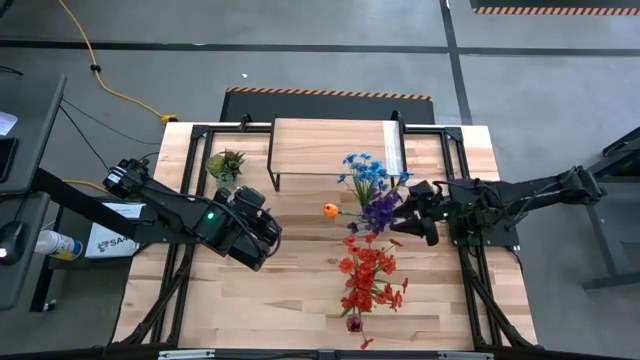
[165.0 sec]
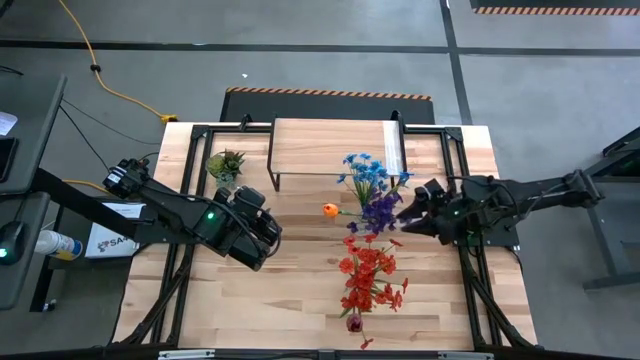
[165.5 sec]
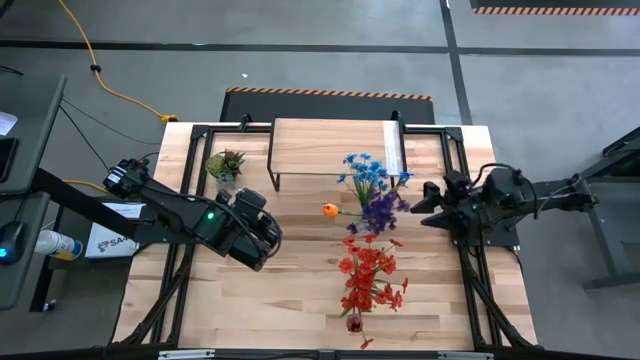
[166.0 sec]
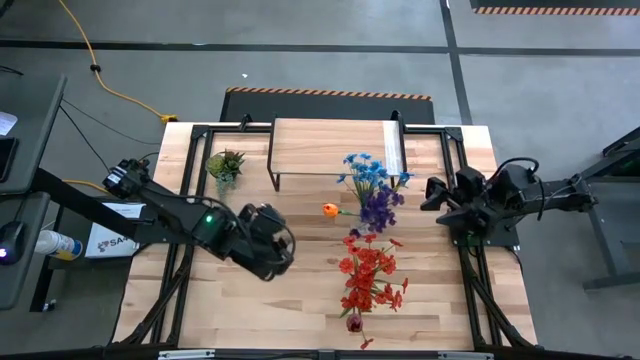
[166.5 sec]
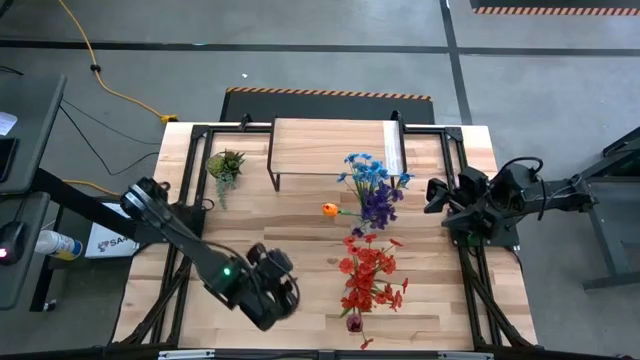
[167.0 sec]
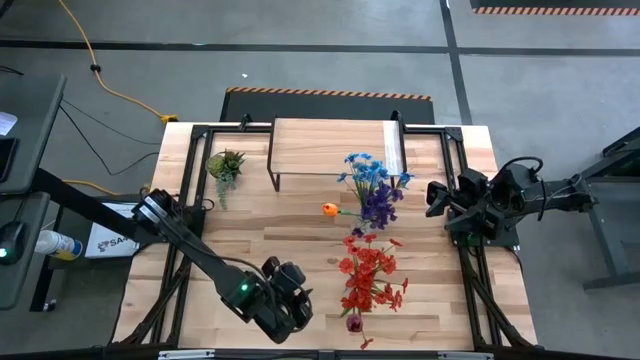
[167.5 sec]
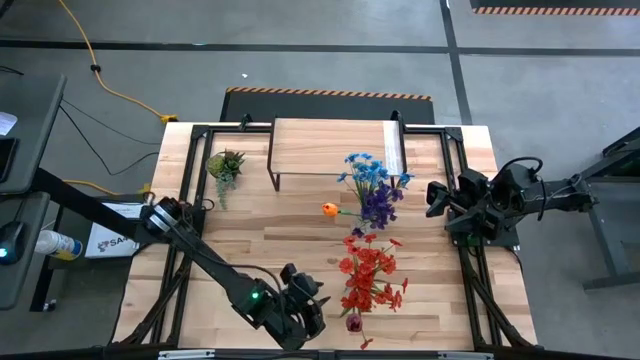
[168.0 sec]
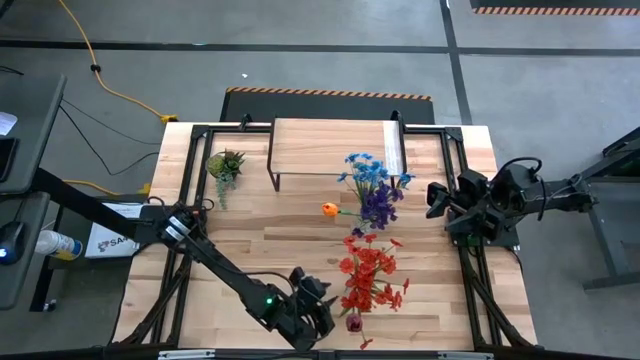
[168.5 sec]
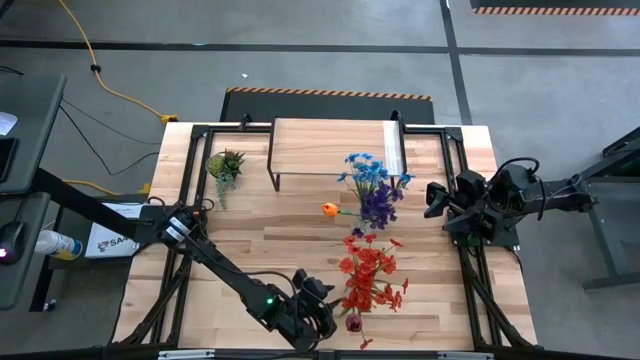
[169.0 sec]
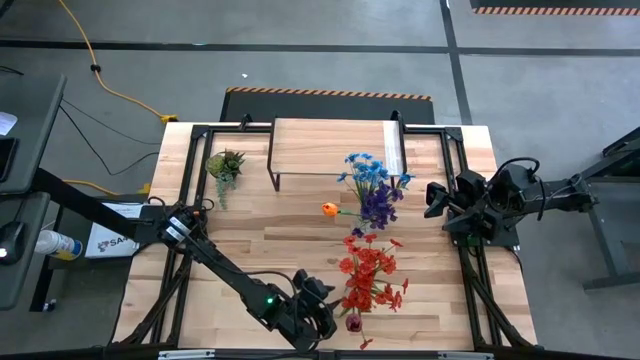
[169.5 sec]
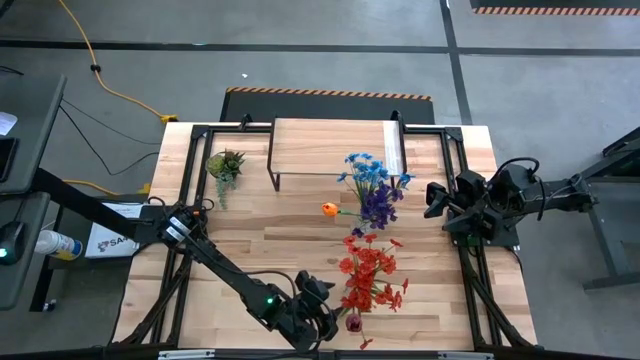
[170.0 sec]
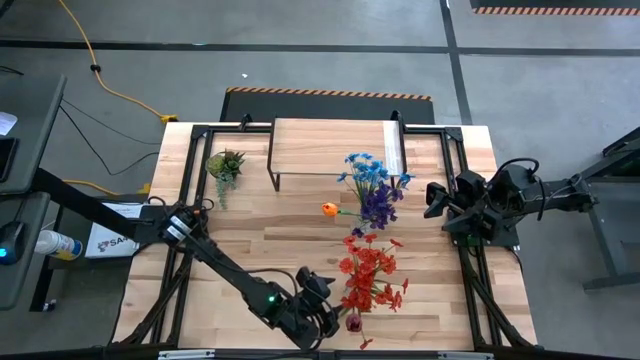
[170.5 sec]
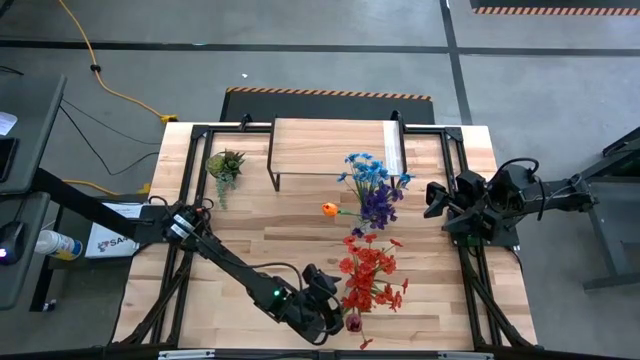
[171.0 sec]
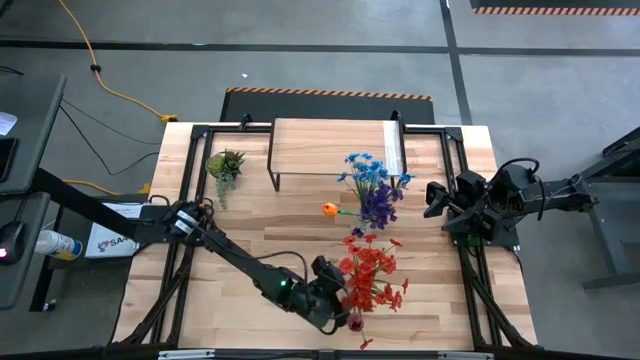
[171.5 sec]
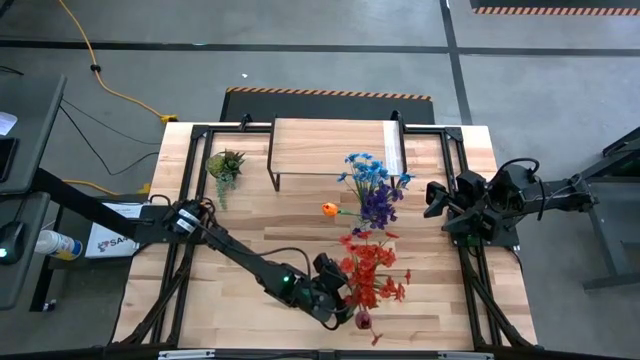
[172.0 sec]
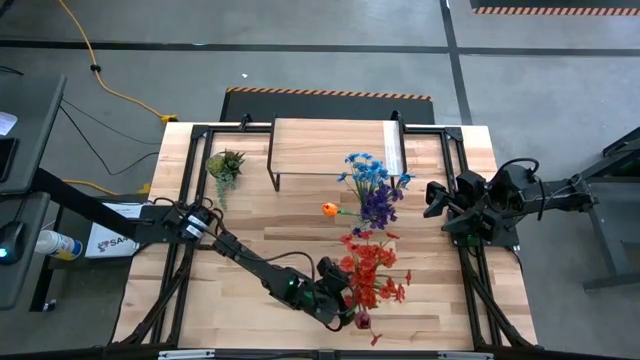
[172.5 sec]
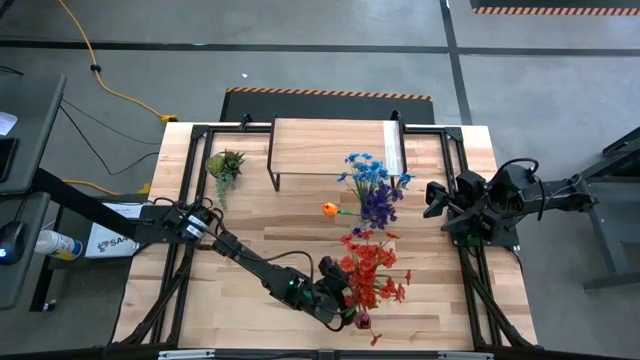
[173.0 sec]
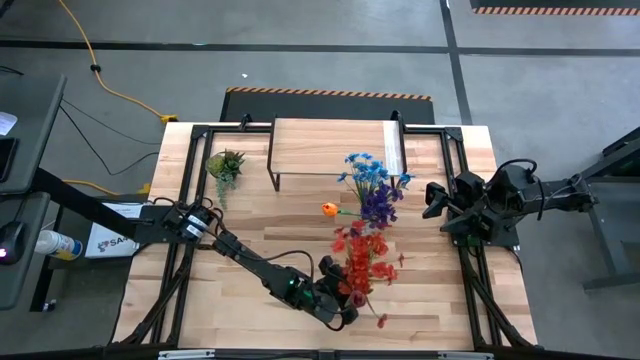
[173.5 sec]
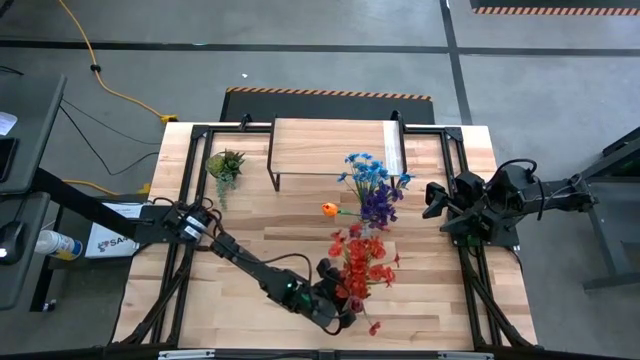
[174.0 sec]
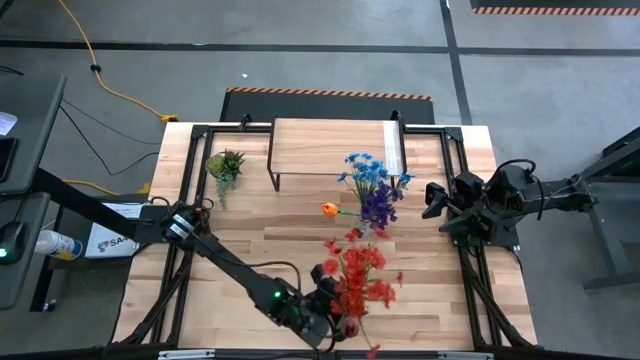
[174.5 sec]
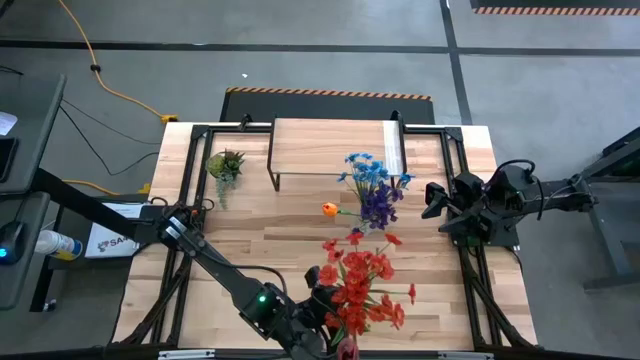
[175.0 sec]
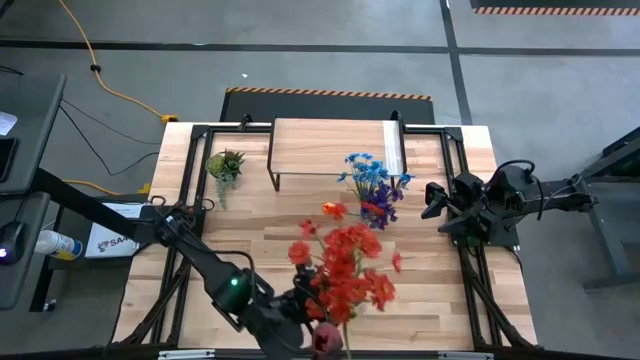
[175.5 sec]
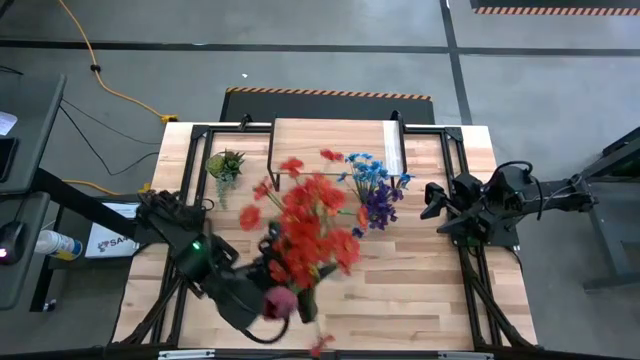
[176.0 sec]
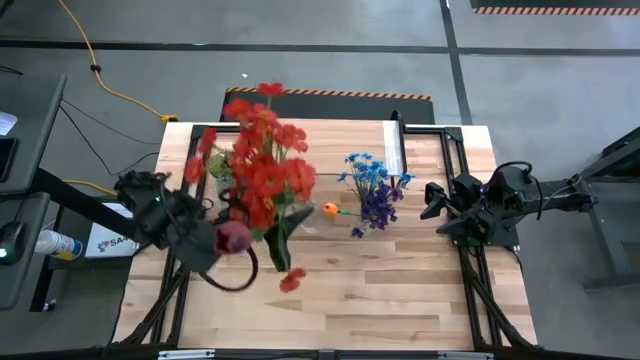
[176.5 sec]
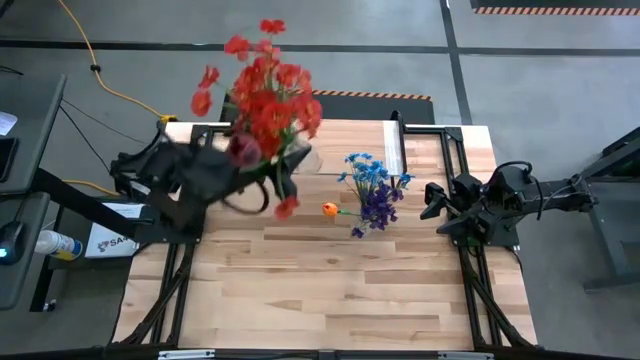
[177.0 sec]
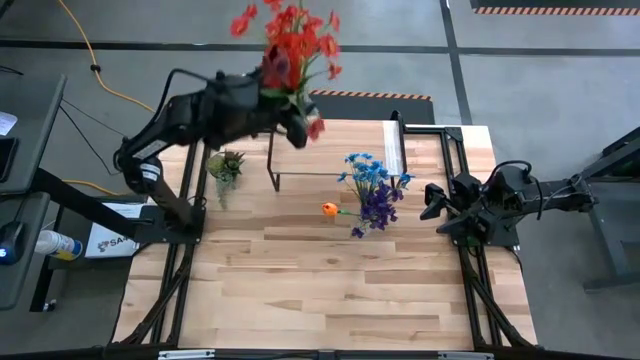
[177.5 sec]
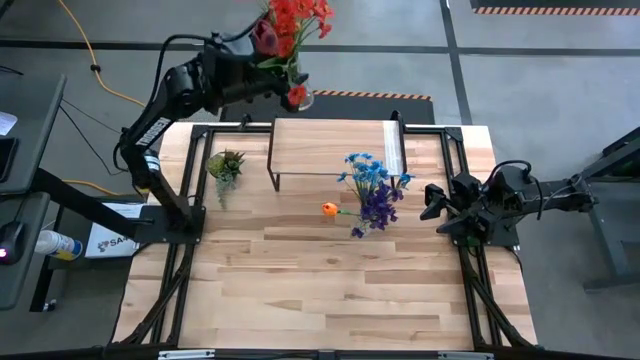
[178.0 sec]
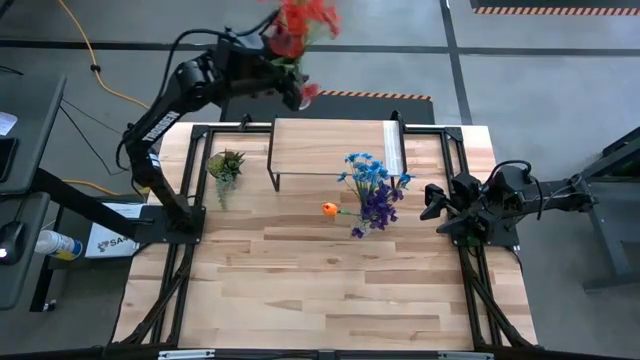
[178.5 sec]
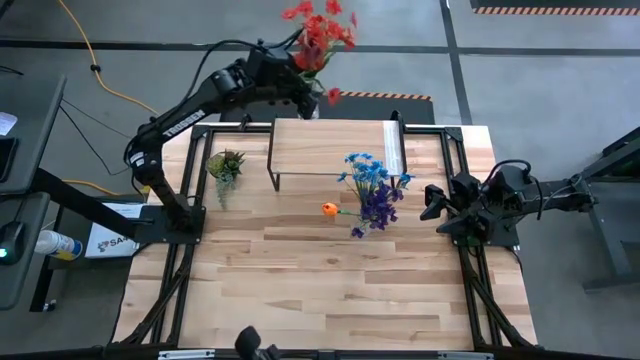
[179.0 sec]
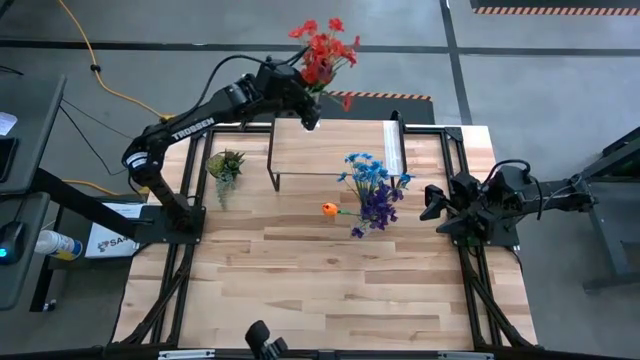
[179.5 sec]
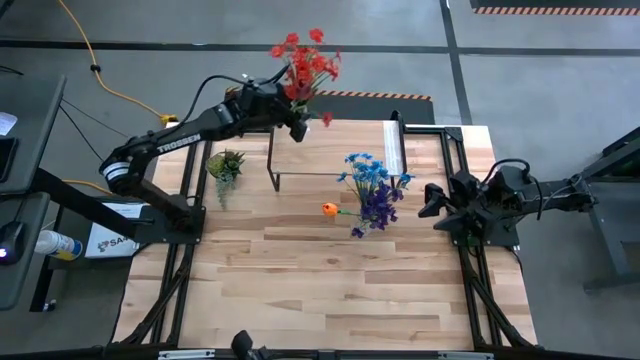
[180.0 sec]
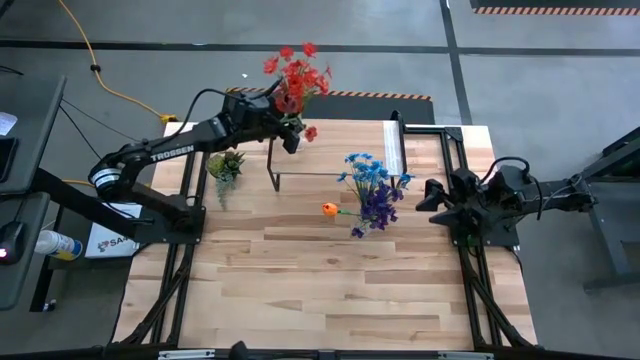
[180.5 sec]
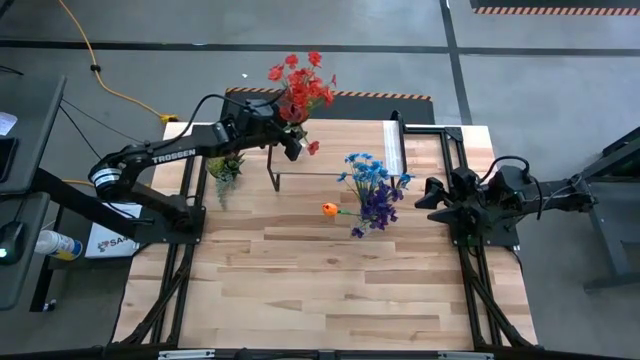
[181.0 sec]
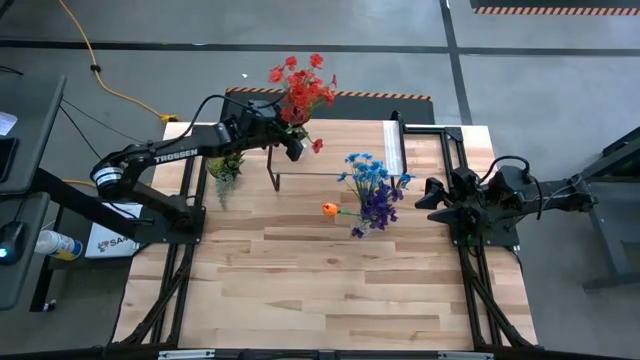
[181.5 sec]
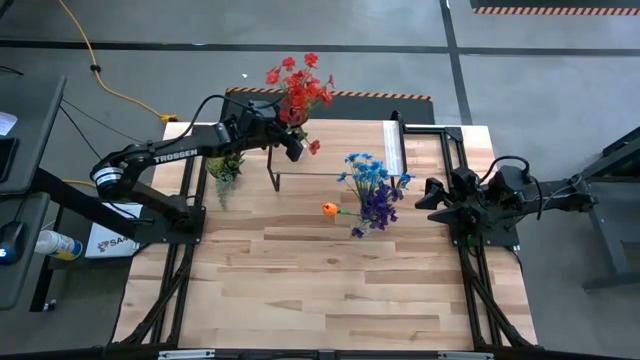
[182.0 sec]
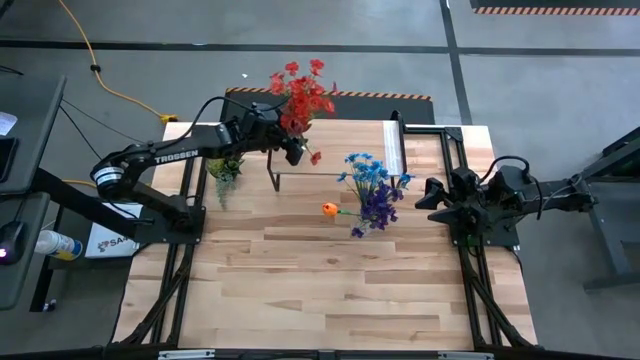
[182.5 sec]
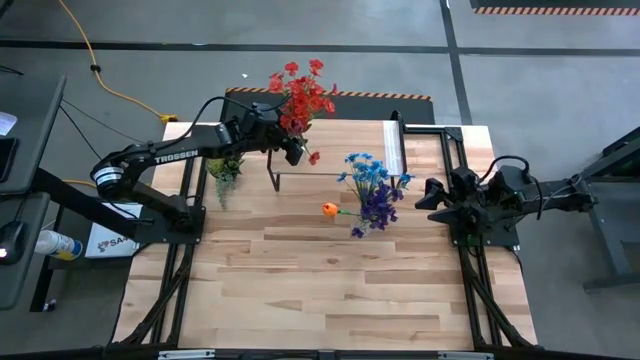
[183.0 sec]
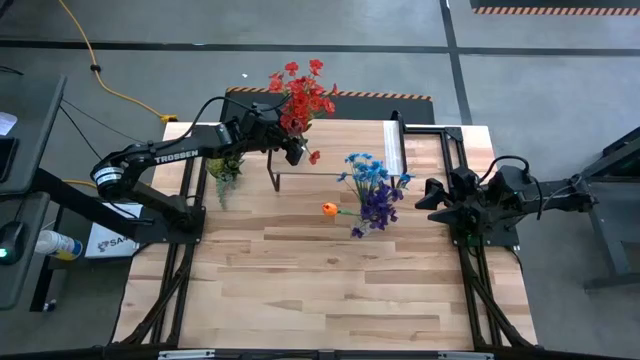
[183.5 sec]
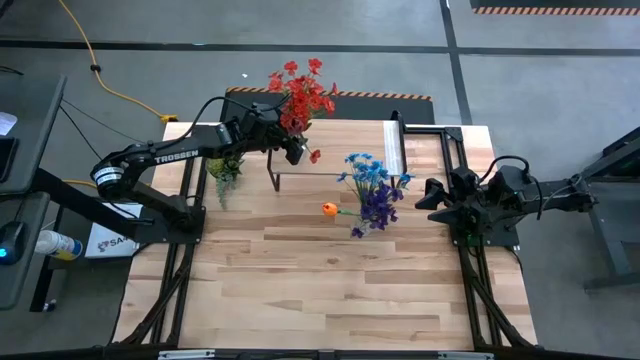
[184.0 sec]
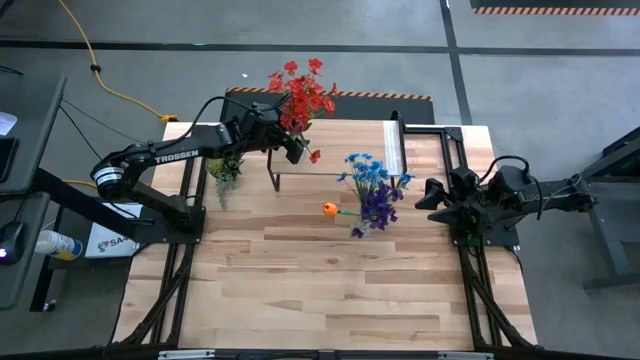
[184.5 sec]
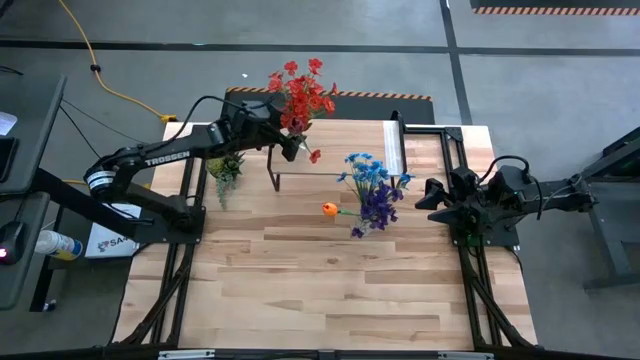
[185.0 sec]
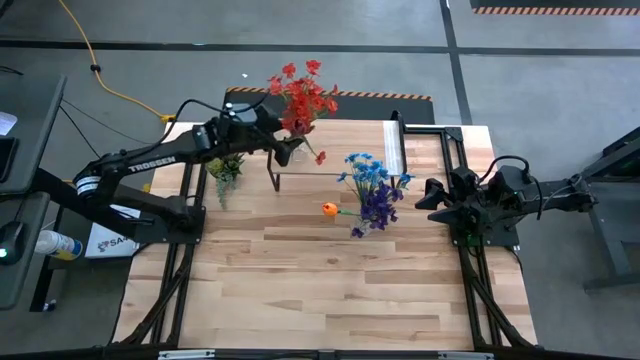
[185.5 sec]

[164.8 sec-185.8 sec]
Task: Pick and place flowers into a vace then onto a shelf
Put the bottom transparent vase with flowers on the shelf

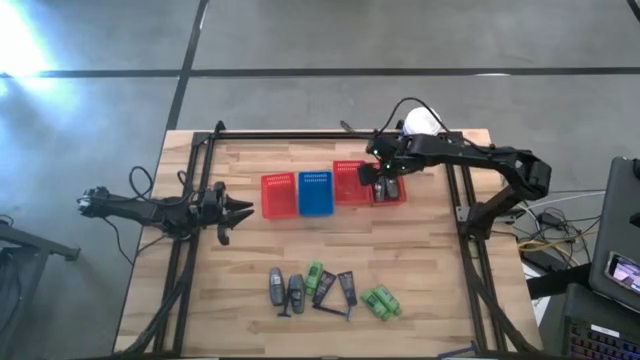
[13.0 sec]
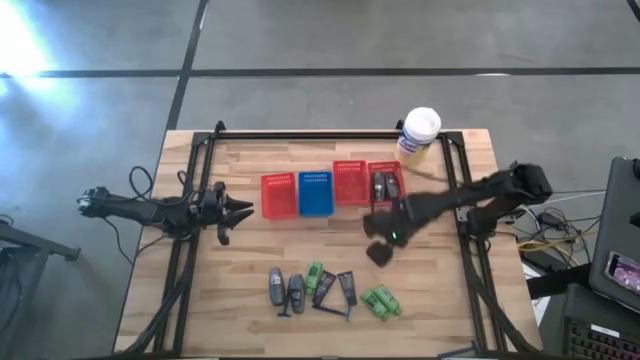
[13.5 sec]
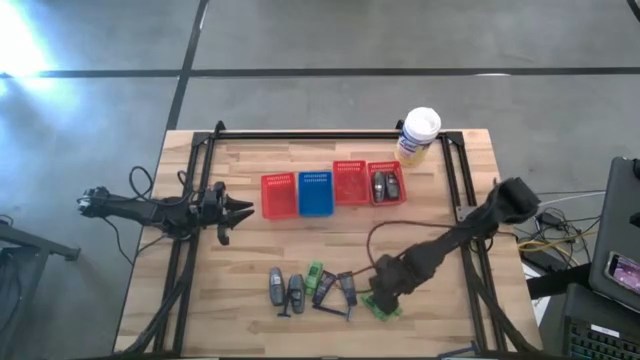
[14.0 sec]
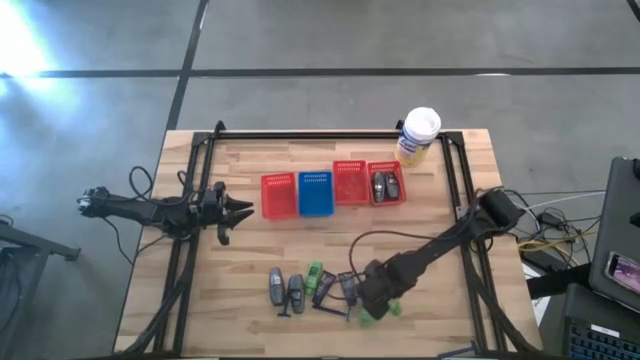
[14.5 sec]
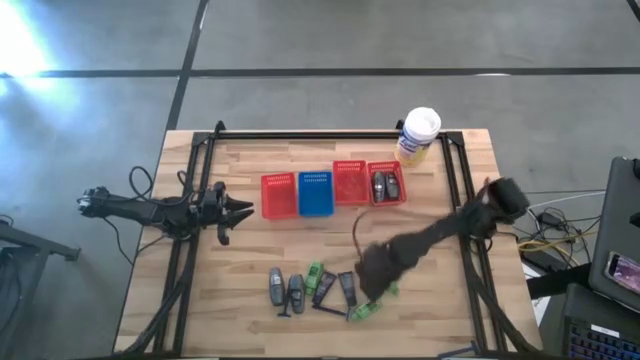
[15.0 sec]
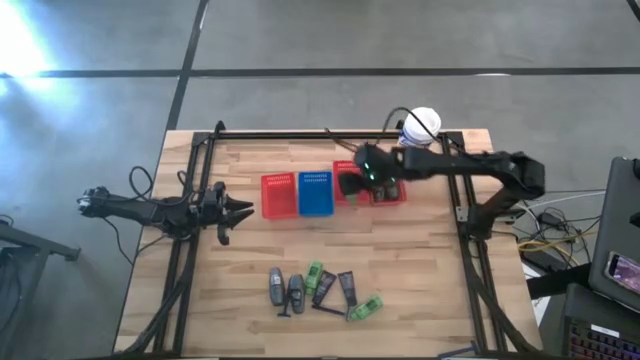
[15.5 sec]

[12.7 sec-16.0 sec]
Task: Pick & Place Travel size toiletries
Put the green shampoo into the middle red bin
